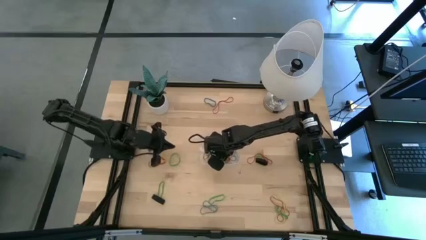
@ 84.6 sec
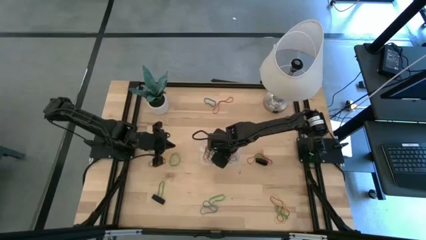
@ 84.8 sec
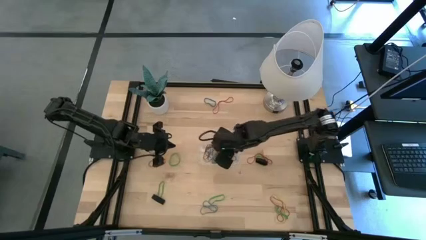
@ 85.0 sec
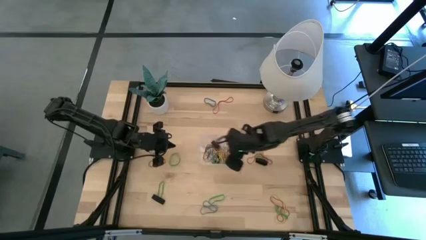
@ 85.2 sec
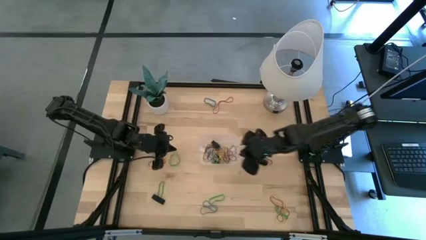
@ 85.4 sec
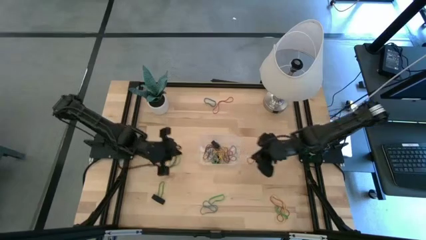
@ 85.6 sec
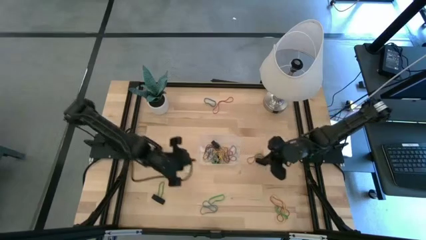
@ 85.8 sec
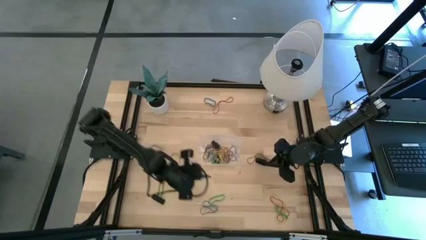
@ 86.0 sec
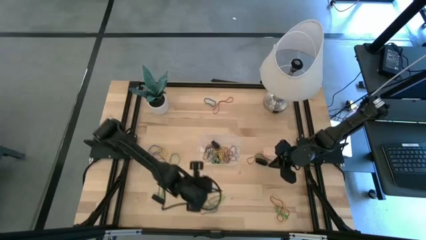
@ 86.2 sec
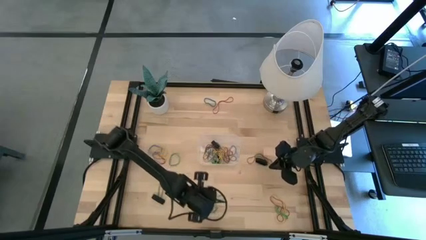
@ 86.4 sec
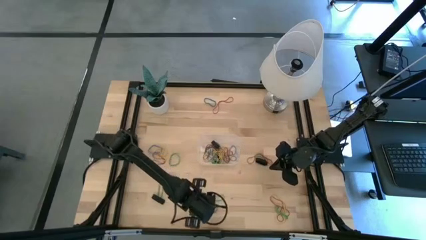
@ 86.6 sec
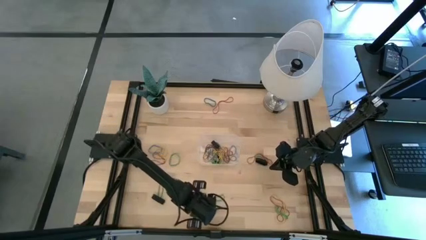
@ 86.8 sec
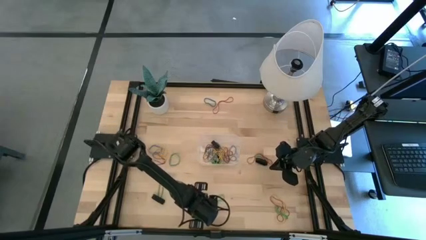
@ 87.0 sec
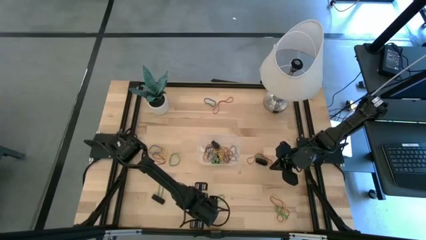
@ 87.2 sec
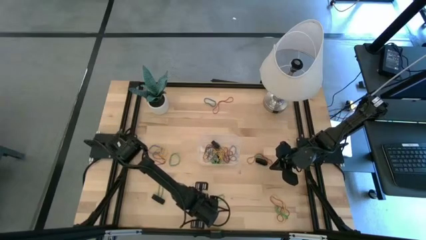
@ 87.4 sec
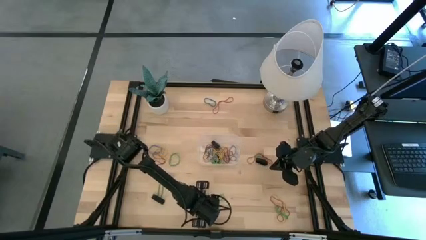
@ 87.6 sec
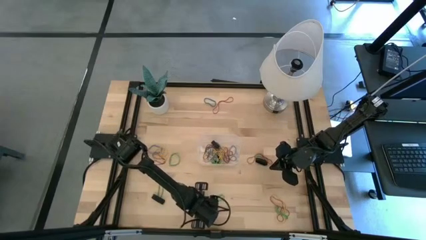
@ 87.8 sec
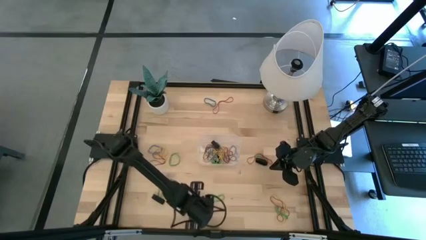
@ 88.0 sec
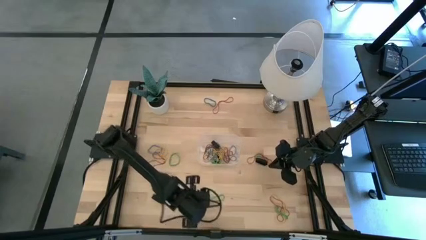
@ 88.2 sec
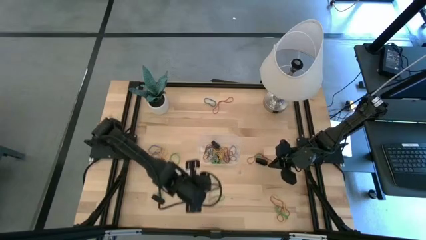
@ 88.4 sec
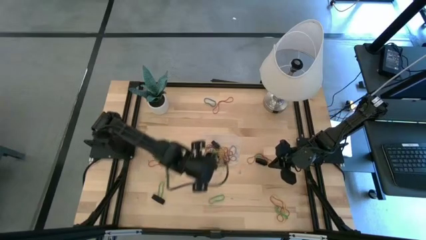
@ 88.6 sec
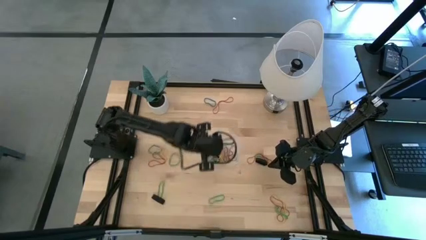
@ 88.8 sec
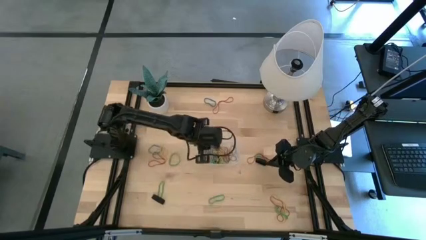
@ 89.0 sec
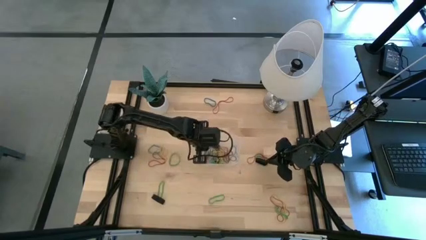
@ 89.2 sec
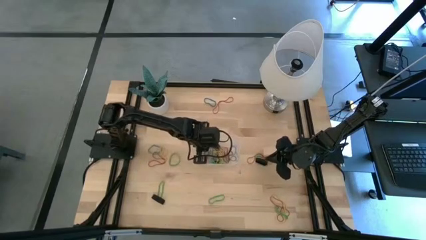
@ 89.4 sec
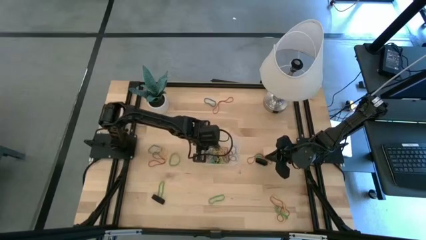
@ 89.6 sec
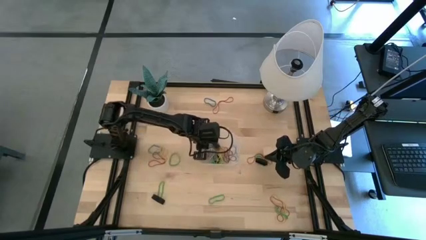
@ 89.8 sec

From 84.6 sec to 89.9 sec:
Task: Pick and place rubber bands into bin
Put the blue rubber band into the transparent bin

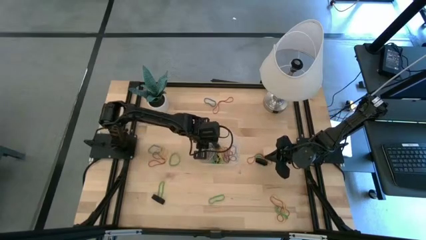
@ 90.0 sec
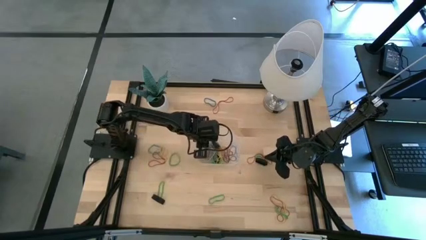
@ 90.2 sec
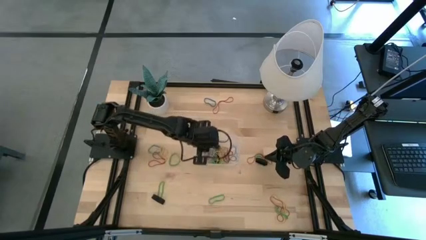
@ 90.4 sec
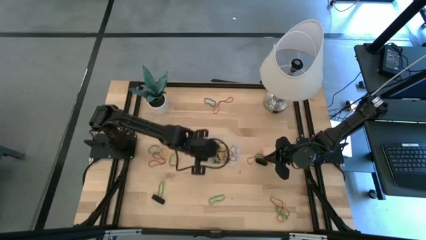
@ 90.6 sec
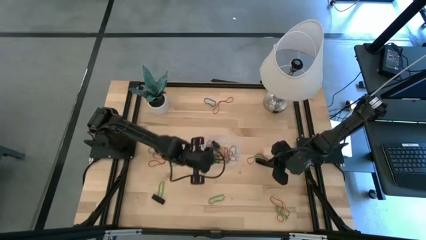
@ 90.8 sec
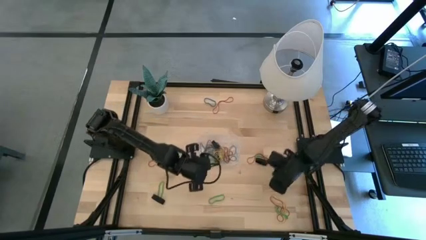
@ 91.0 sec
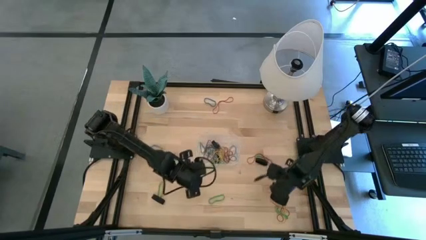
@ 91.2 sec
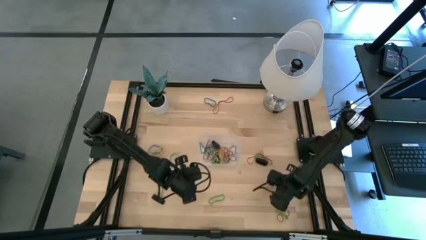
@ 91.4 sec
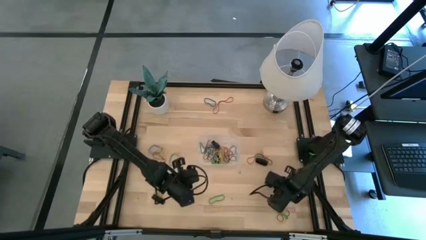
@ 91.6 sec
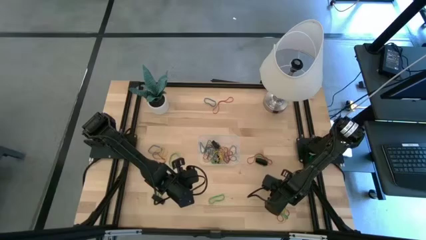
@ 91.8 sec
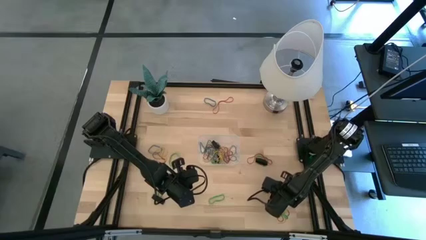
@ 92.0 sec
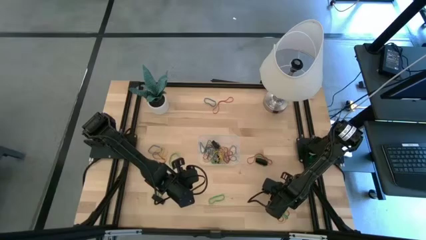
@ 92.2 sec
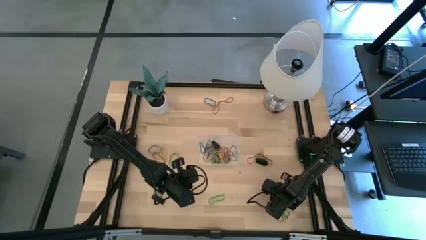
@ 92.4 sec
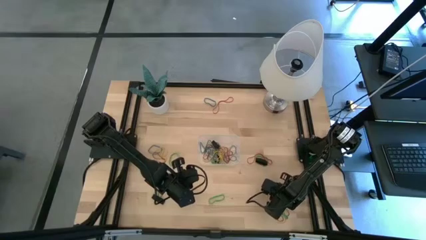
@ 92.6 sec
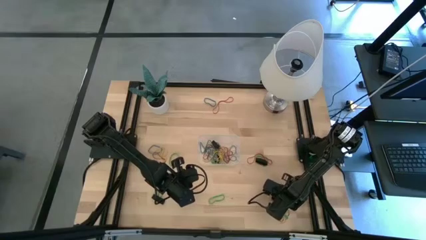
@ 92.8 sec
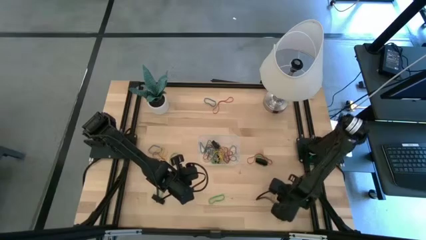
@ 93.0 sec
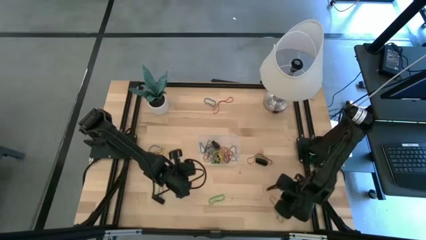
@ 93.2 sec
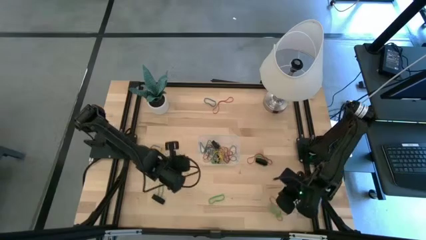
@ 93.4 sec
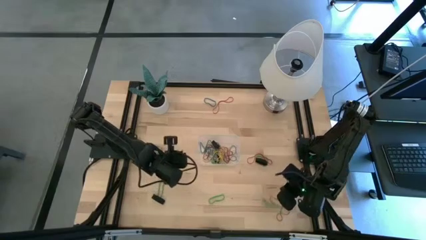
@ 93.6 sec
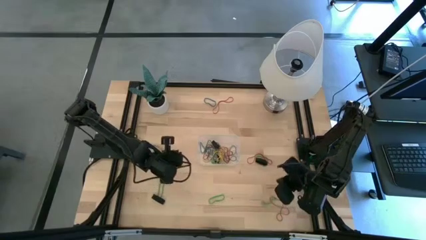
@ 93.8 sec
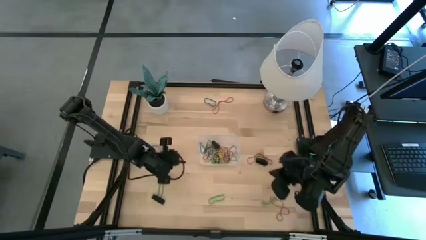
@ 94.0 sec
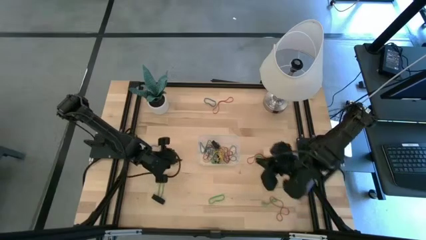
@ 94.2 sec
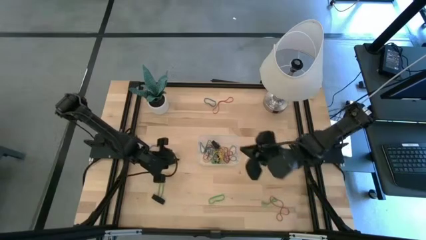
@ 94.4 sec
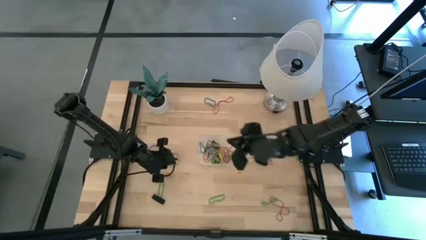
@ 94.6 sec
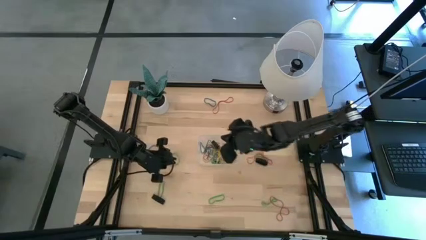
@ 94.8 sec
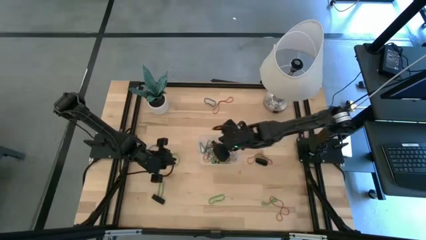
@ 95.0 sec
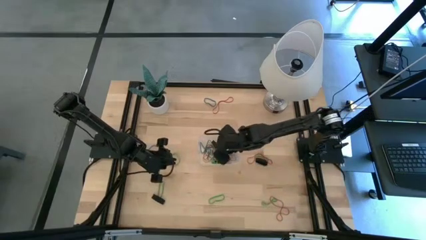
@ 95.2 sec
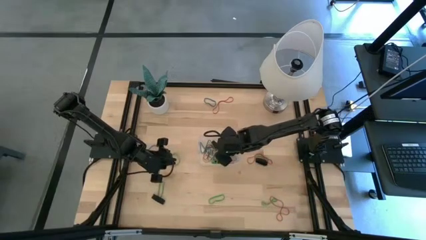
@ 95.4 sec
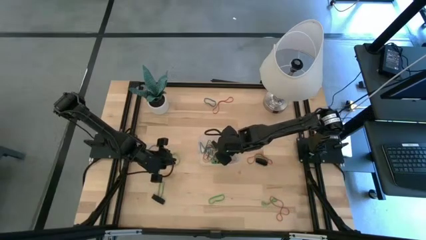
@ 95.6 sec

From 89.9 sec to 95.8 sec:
Put the yellow rubber band into the transparent bin

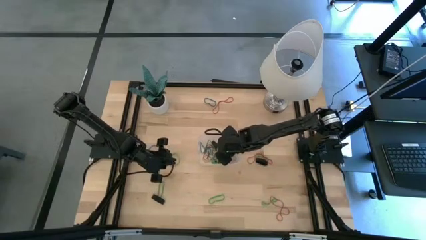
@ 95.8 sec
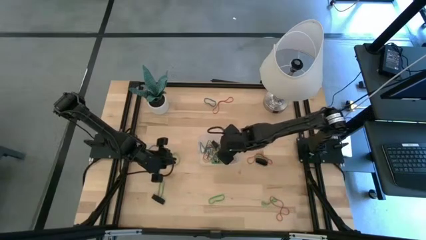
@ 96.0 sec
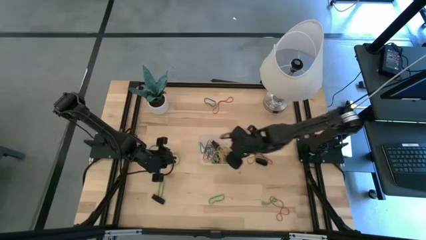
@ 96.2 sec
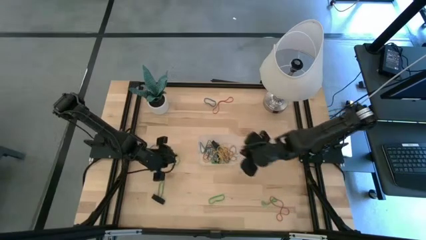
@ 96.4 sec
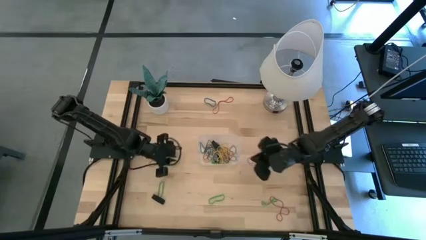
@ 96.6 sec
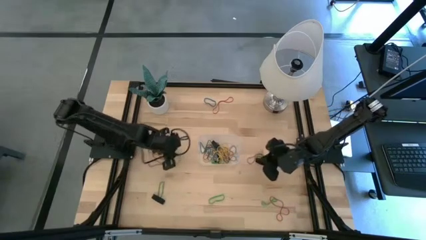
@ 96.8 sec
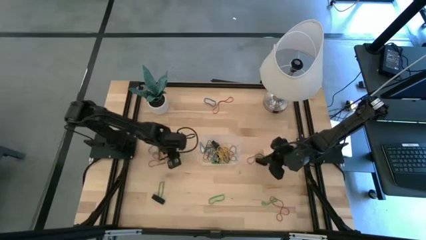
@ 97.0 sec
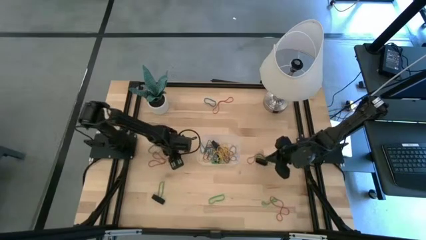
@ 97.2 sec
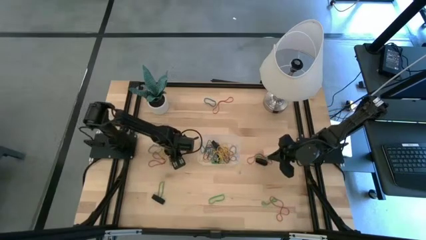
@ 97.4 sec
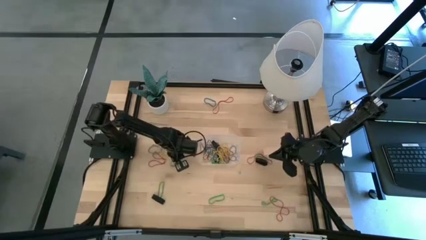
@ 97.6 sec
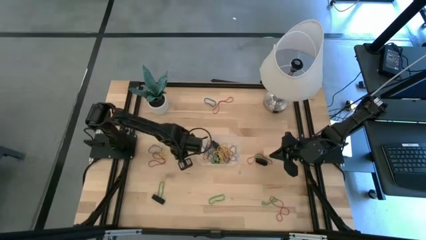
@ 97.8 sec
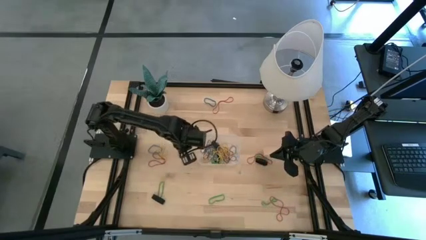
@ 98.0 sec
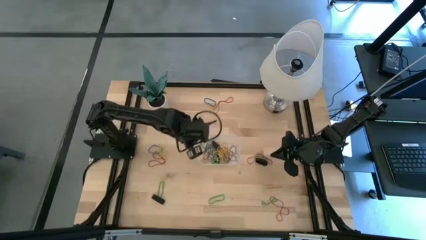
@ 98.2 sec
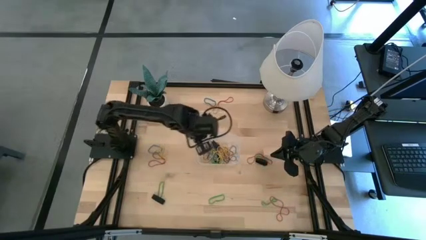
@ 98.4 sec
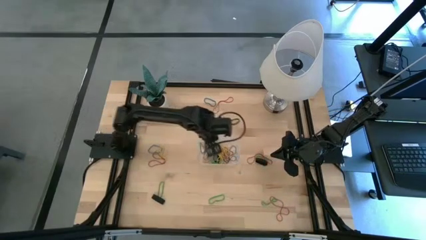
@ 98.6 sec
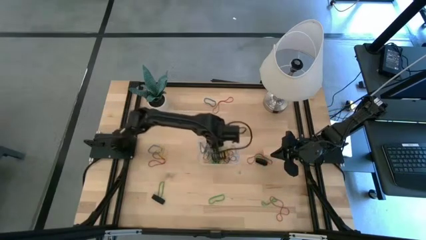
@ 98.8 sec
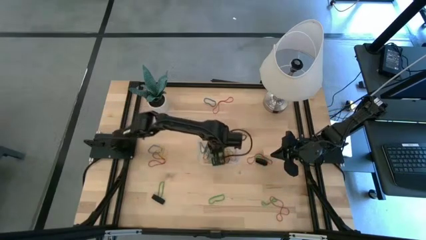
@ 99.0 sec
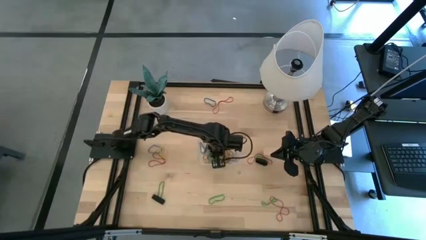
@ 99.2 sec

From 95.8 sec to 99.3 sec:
Put the green rubber band into the transparent bin

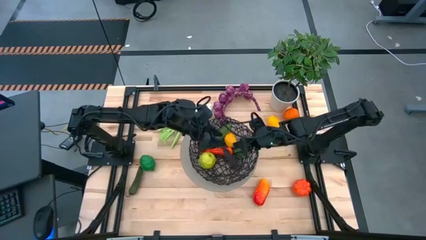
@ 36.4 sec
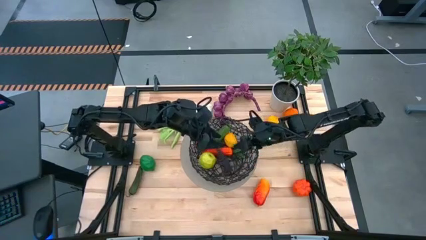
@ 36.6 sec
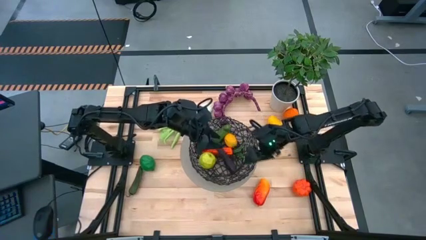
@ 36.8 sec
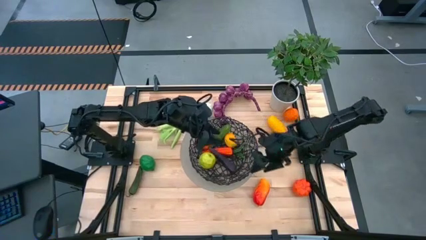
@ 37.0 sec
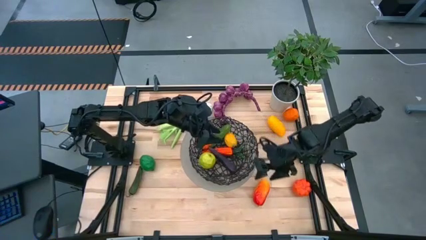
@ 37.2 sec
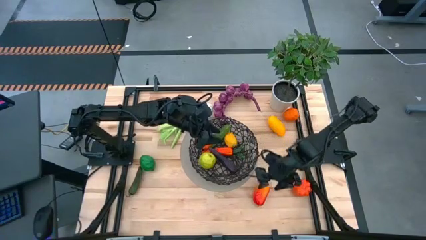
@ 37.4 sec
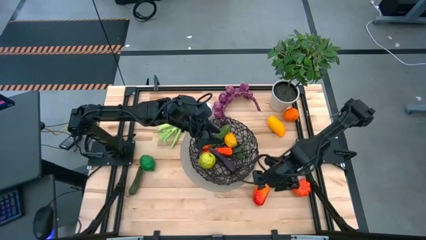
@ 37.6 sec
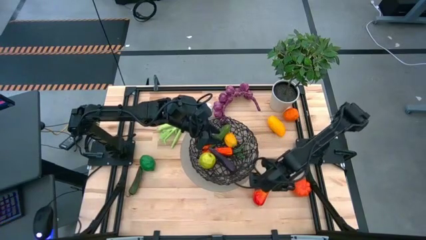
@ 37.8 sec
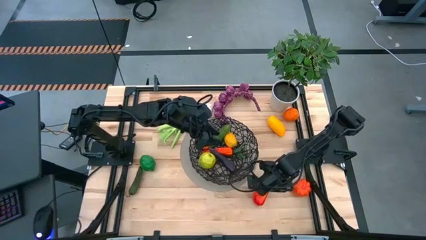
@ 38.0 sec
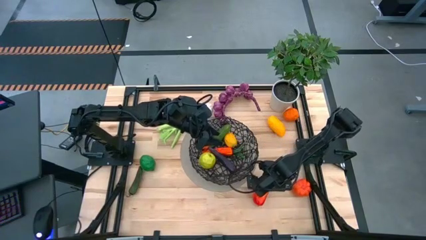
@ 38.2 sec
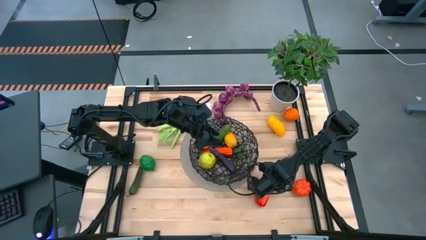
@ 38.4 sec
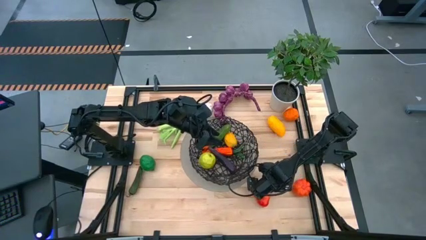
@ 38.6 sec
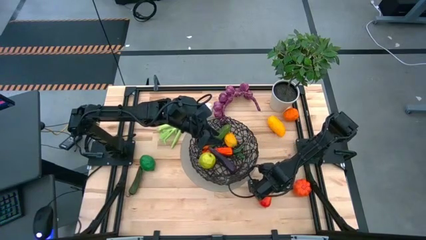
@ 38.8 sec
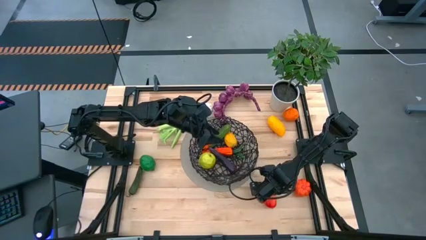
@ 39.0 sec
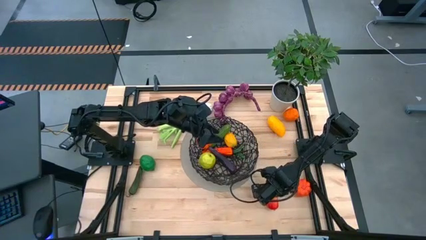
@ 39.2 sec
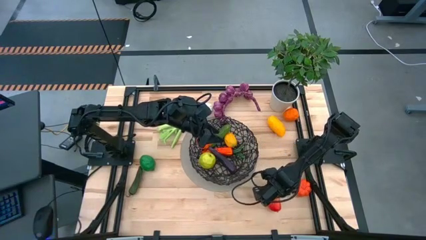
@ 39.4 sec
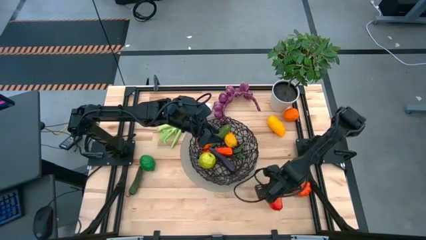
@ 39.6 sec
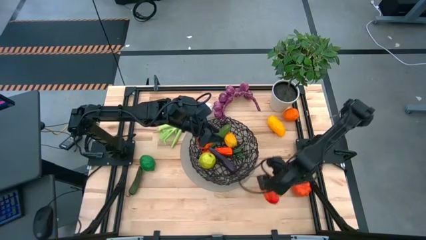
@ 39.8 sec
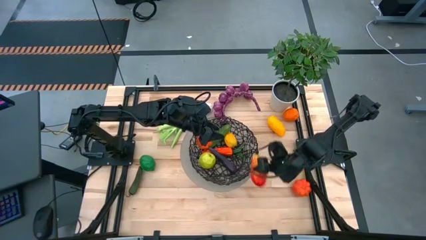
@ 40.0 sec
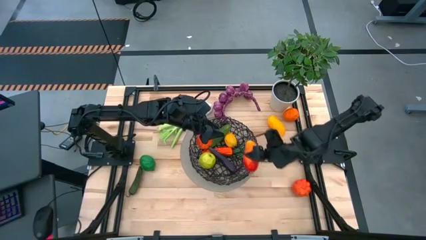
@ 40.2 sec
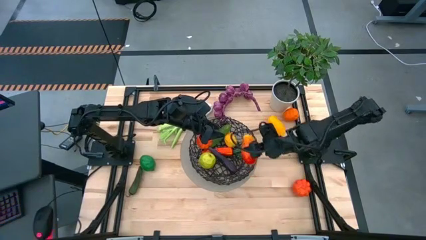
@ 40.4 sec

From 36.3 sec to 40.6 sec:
Task: Build produce basket
Put the red mango into the black wire basket
